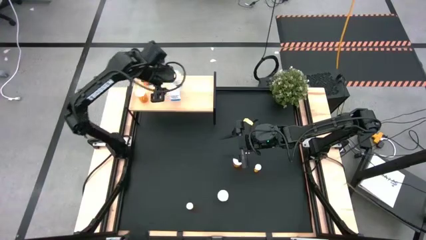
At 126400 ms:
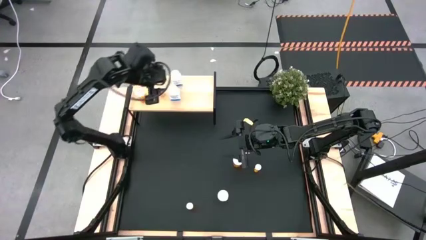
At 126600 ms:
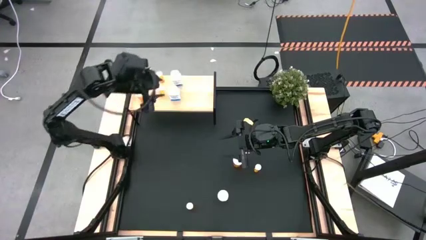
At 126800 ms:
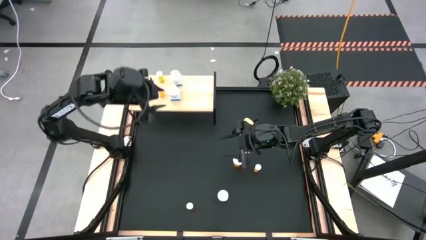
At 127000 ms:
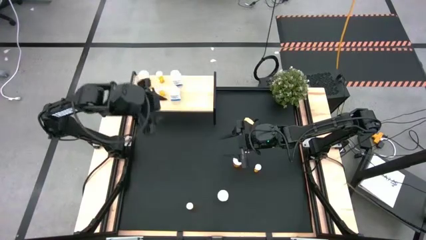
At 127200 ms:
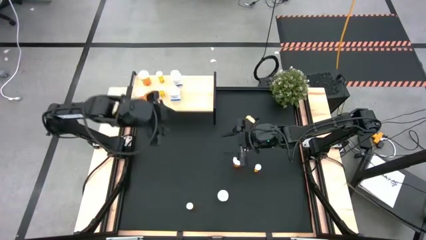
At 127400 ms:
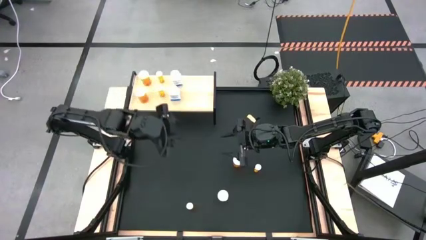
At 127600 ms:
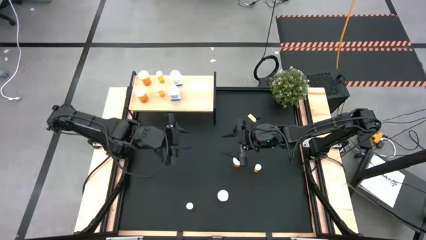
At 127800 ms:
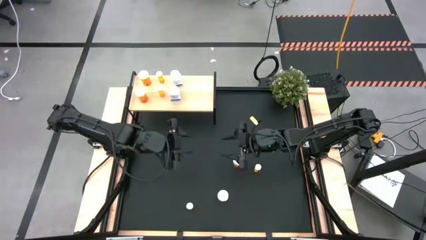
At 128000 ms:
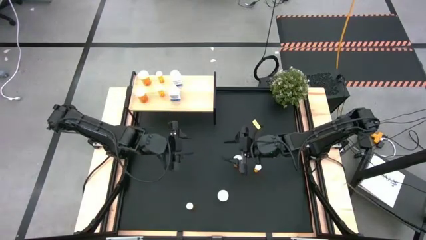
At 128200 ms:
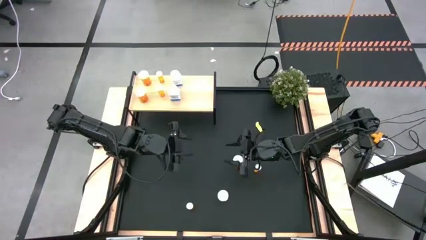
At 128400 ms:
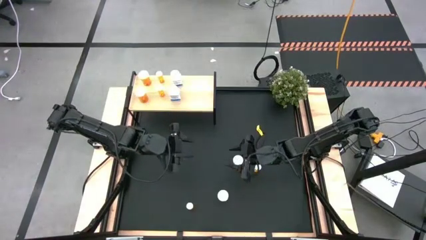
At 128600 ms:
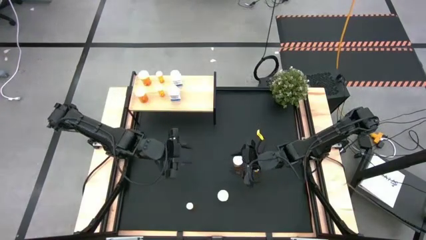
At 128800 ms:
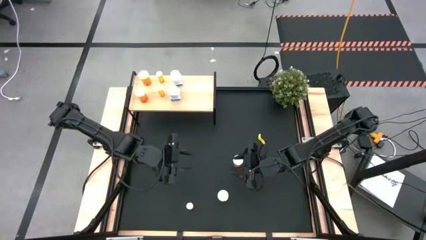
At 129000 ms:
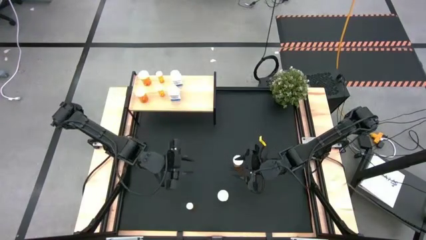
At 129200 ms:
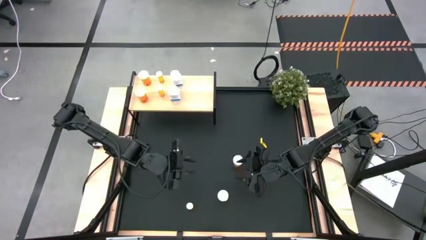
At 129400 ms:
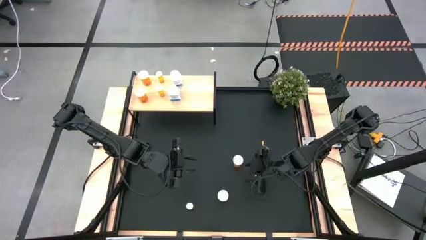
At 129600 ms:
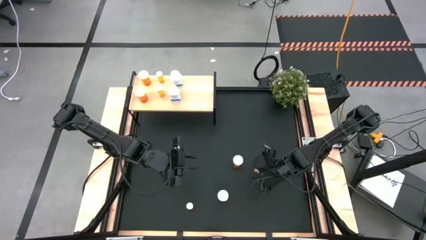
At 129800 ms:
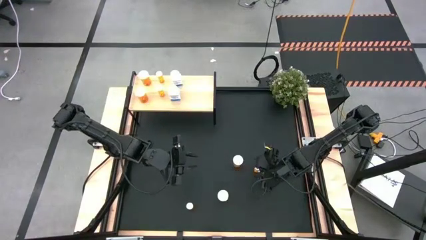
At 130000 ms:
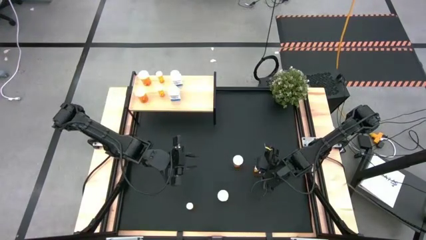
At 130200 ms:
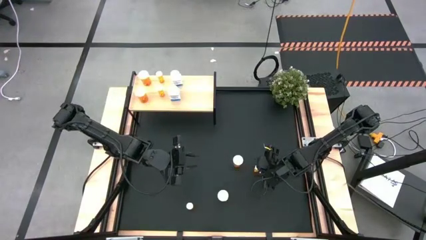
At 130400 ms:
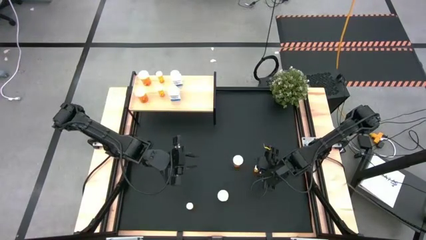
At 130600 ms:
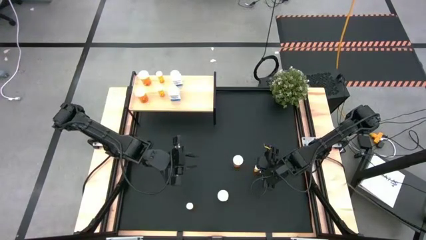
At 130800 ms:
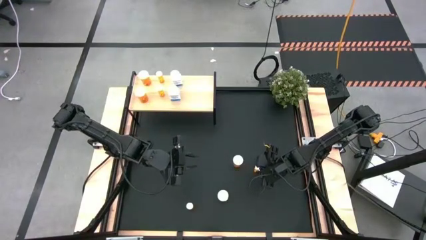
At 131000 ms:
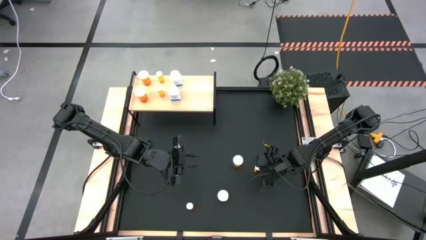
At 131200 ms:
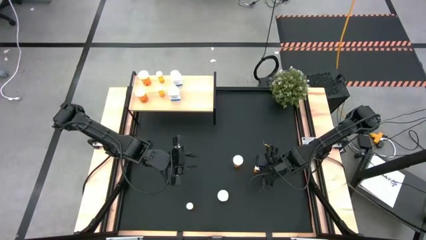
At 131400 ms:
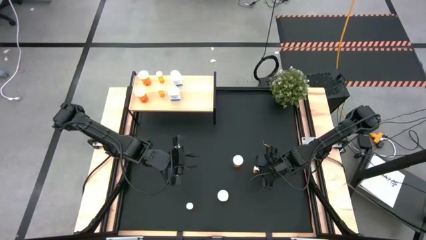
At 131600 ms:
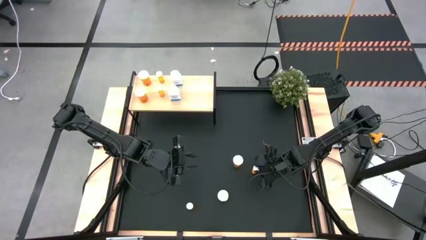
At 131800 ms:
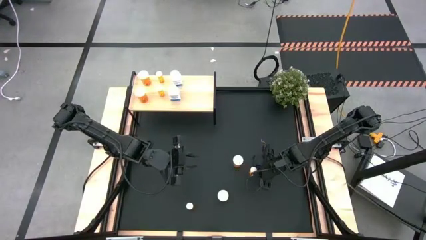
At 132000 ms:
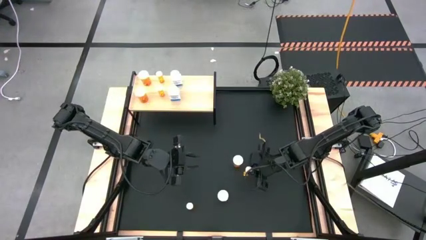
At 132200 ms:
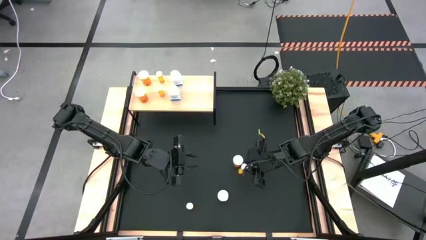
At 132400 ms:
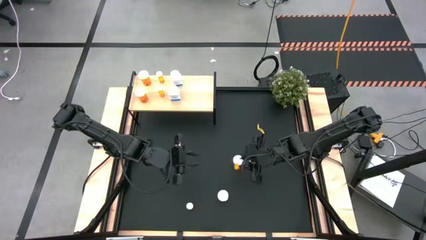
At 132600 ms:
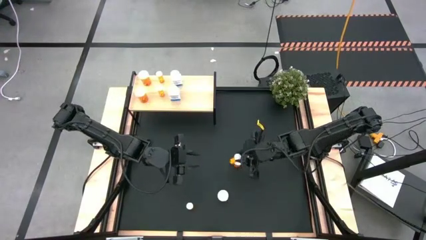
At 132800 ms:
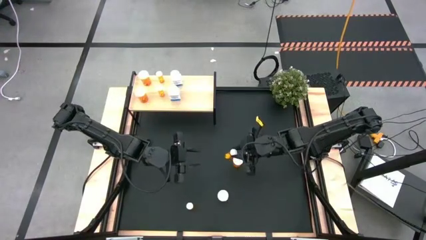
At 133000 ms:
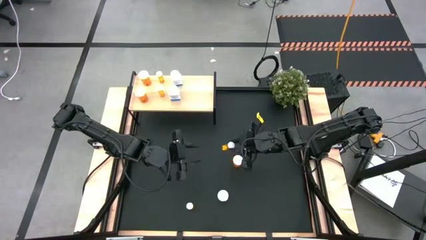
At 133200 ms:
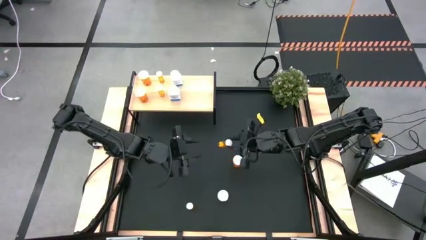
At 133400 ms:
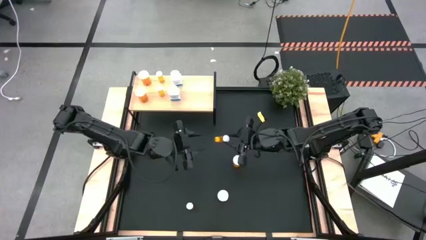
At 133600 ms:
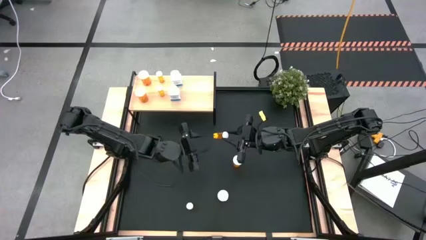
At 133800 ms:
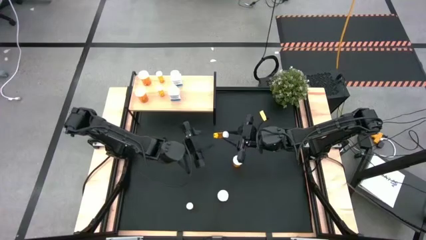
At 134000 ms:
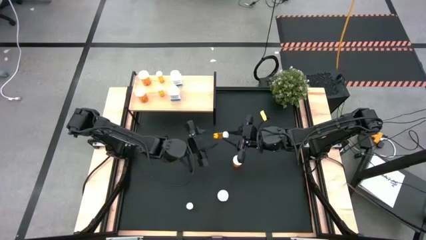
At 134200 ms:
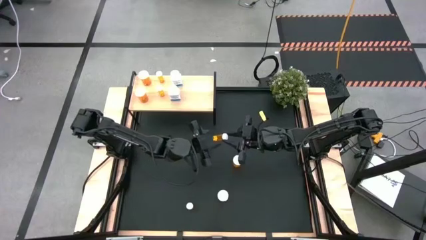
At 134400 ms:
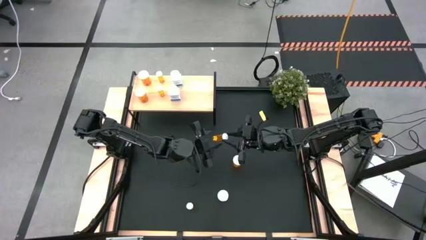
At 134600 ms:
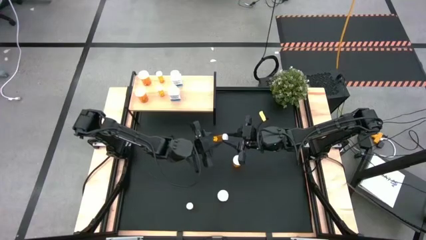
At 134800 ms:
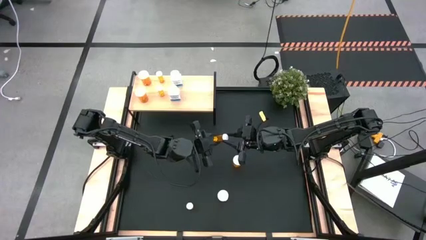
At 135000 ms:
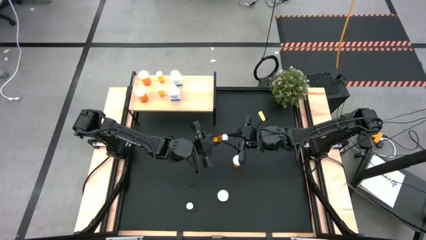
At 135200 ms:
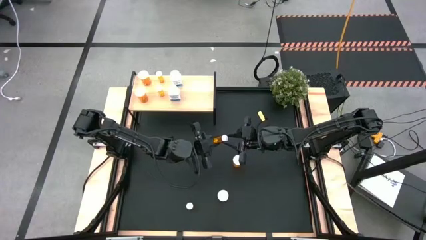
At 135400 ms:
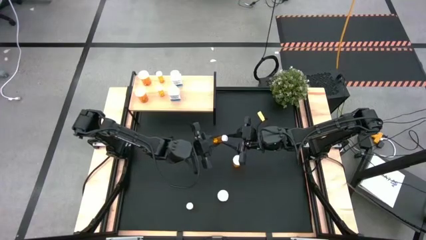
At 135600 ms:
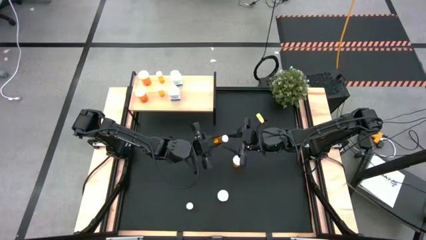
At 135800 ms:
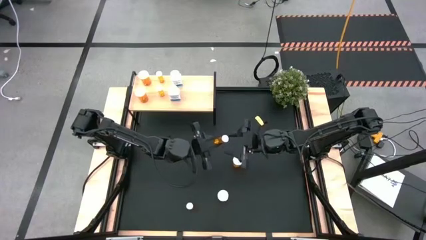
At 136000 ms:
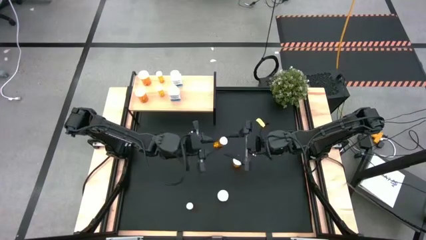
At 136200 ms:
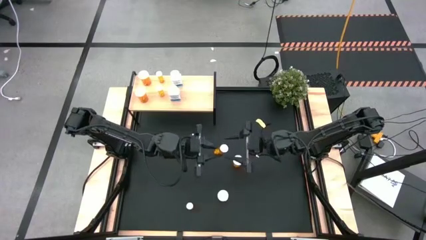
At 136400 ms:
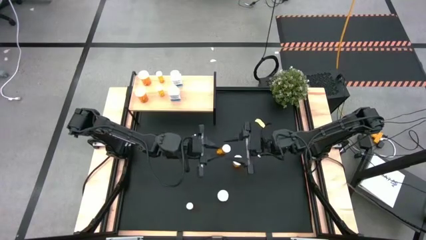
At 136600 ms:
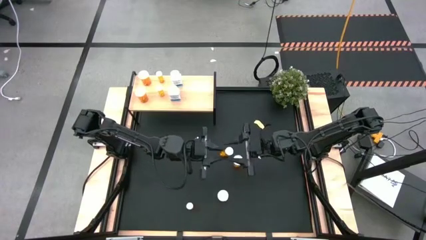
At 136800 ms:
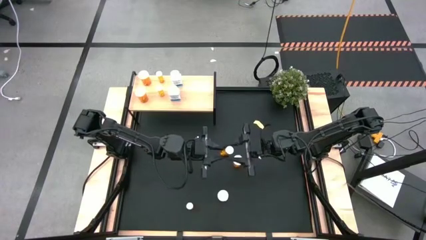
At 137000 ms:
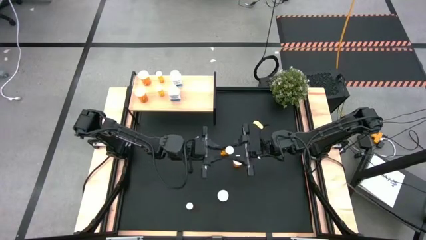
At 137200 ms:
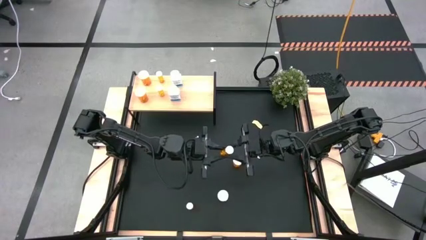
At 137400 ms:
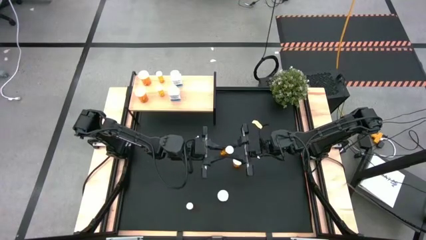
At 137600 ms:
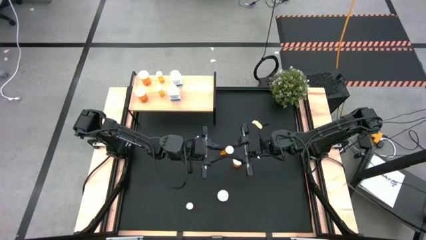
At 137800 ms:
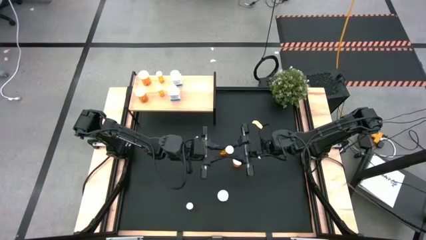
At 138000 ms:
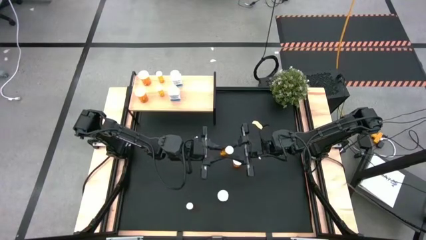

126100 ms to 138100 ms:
Task: Pick and place medicine bottles onto shelf by color
Put the small orange pill bottle on the shelf
